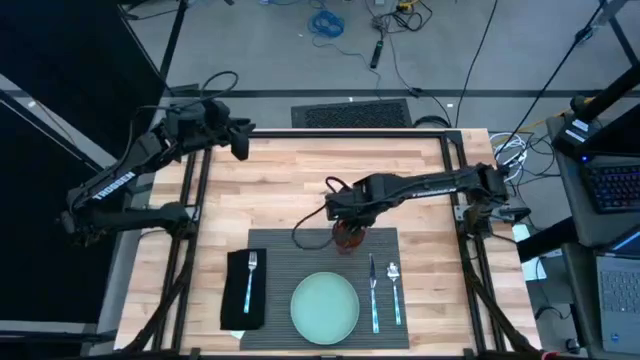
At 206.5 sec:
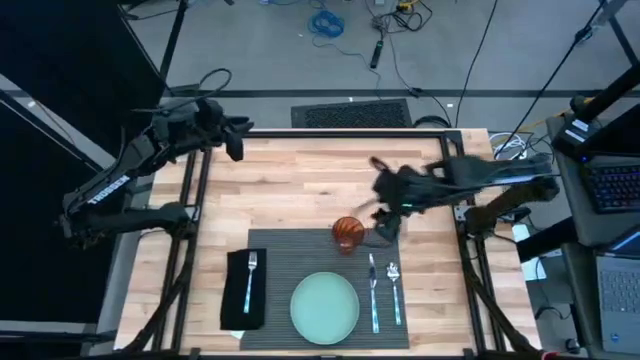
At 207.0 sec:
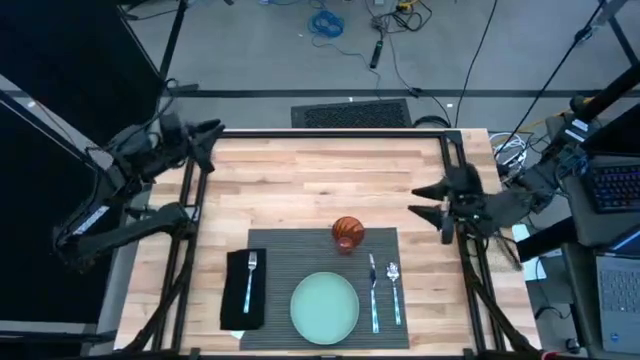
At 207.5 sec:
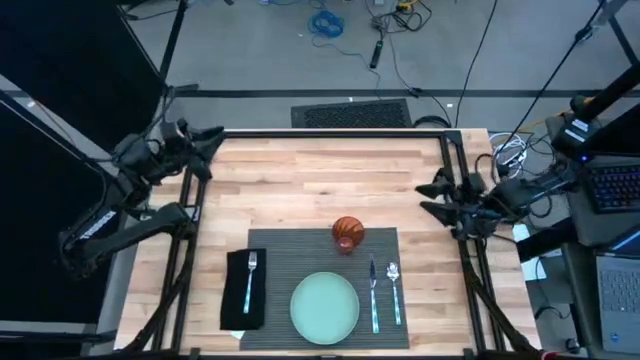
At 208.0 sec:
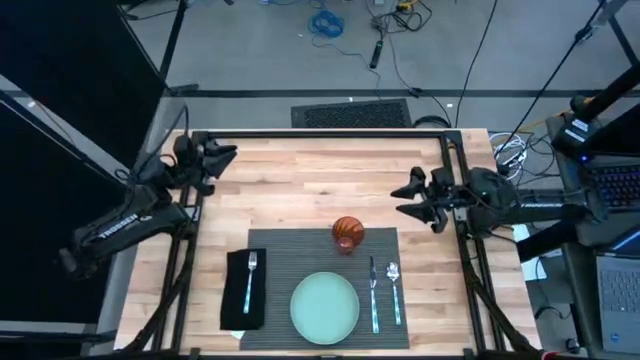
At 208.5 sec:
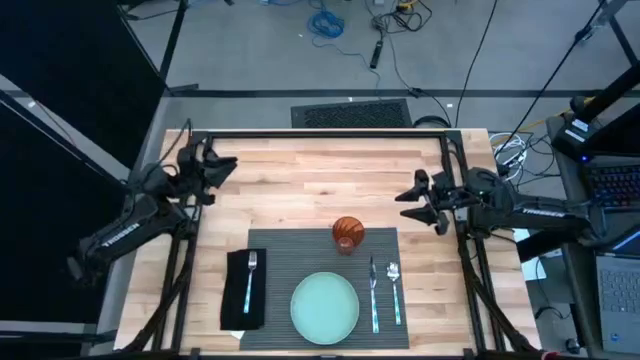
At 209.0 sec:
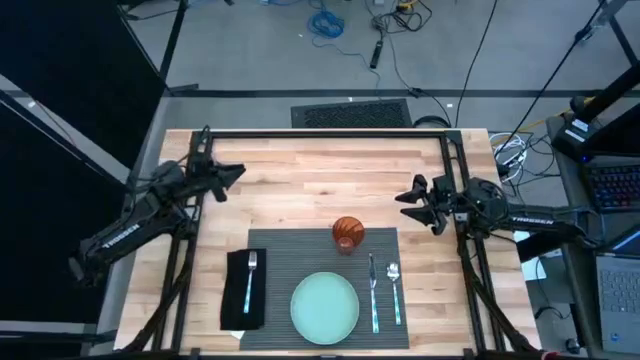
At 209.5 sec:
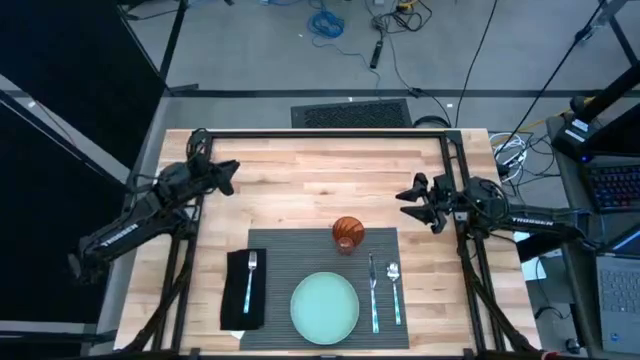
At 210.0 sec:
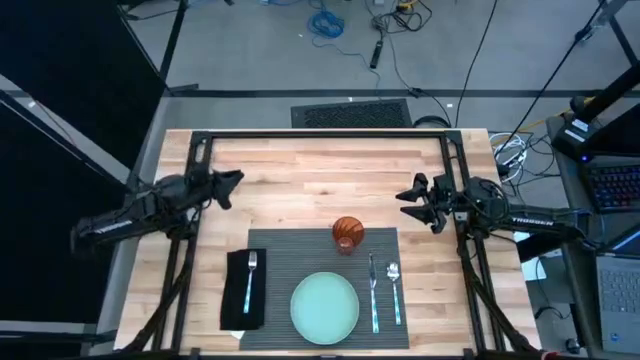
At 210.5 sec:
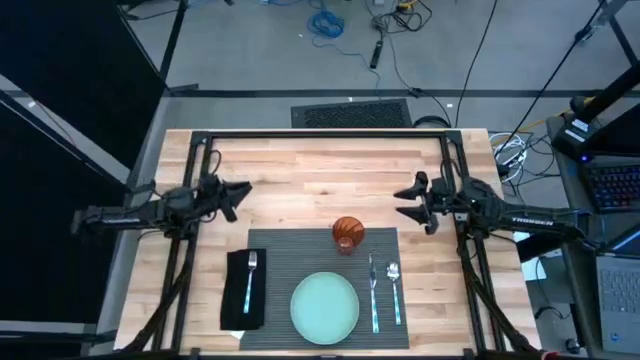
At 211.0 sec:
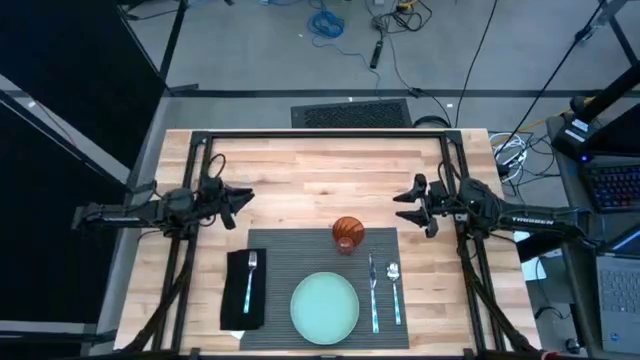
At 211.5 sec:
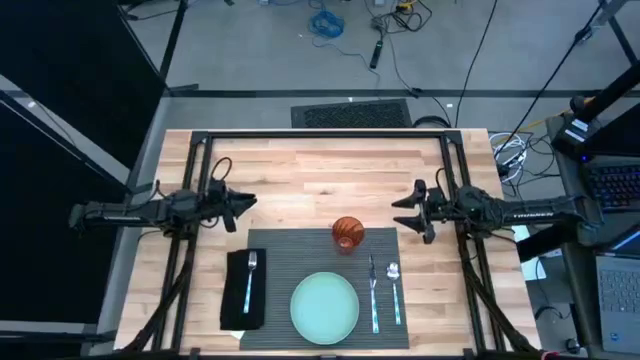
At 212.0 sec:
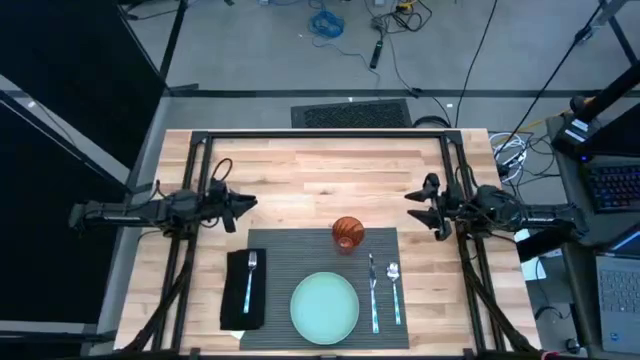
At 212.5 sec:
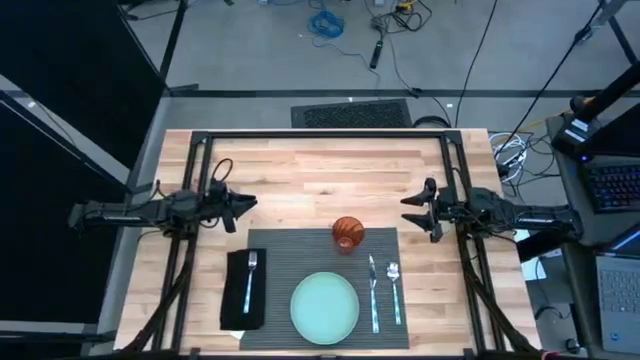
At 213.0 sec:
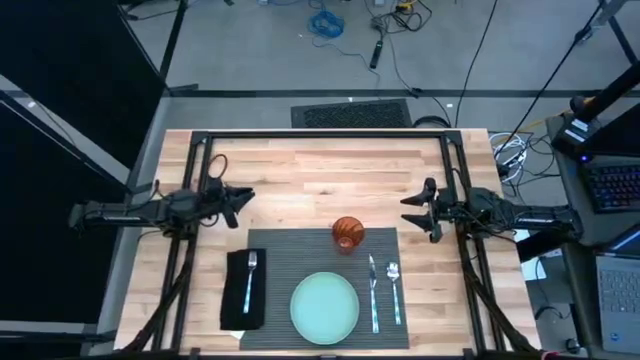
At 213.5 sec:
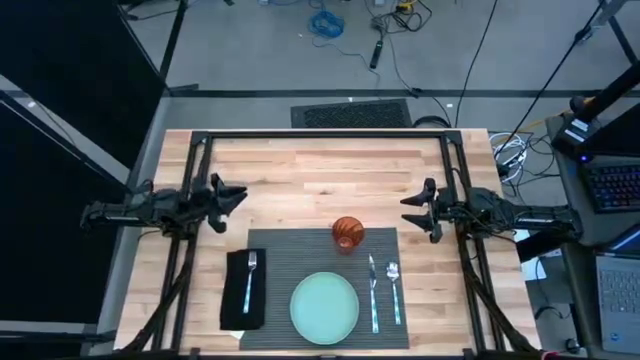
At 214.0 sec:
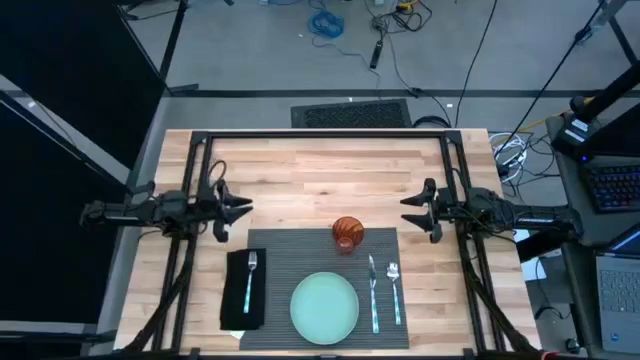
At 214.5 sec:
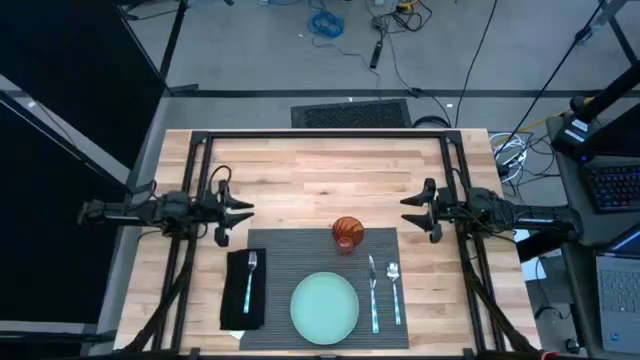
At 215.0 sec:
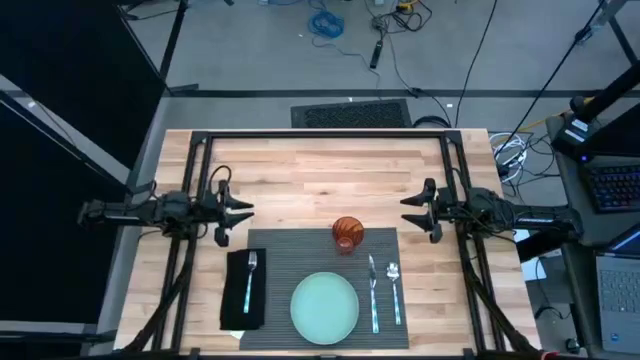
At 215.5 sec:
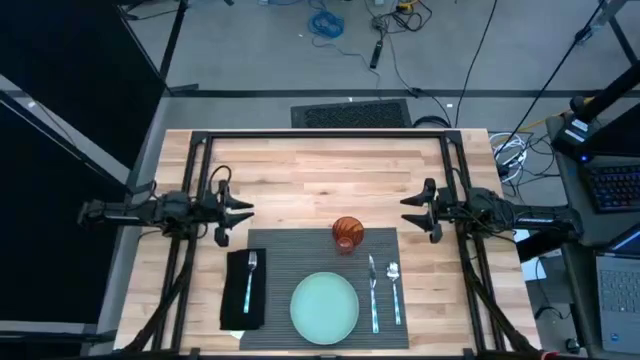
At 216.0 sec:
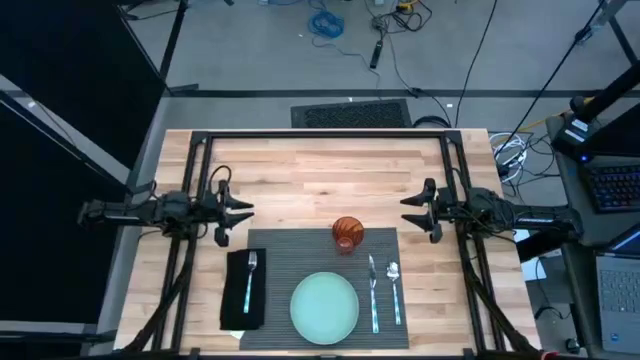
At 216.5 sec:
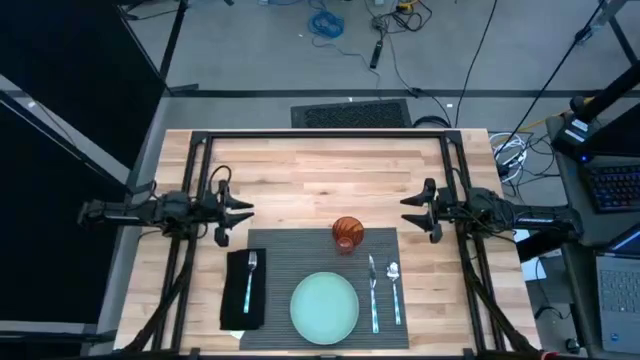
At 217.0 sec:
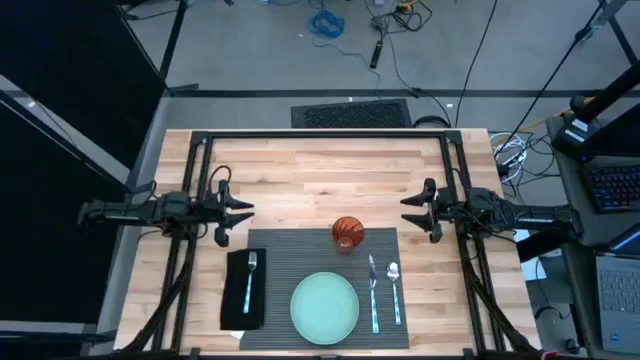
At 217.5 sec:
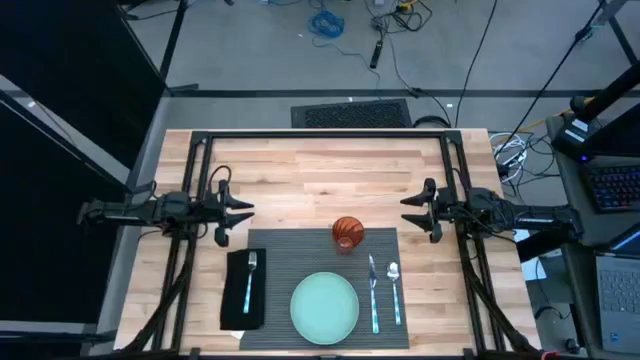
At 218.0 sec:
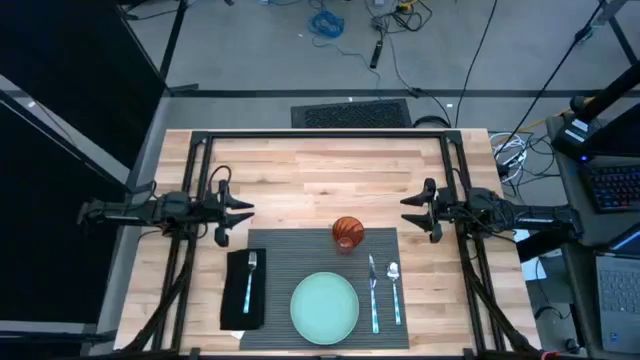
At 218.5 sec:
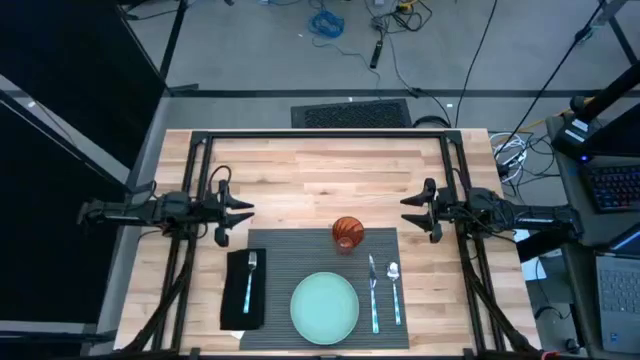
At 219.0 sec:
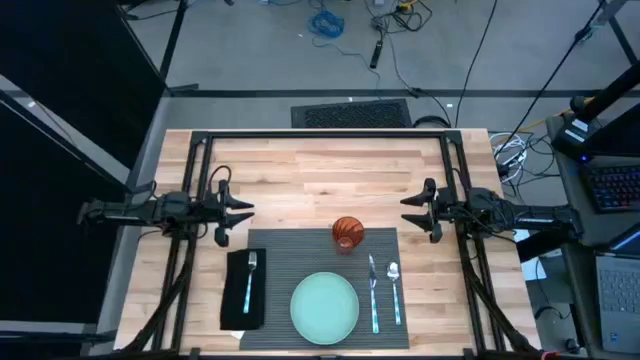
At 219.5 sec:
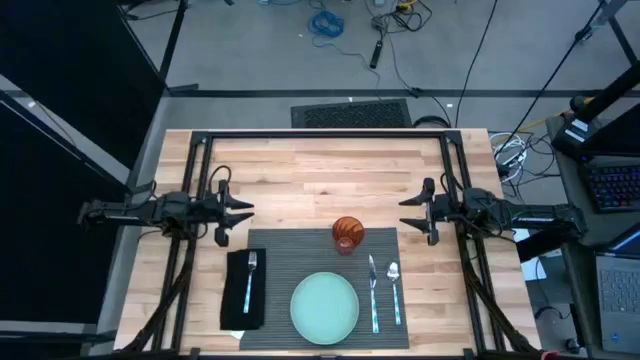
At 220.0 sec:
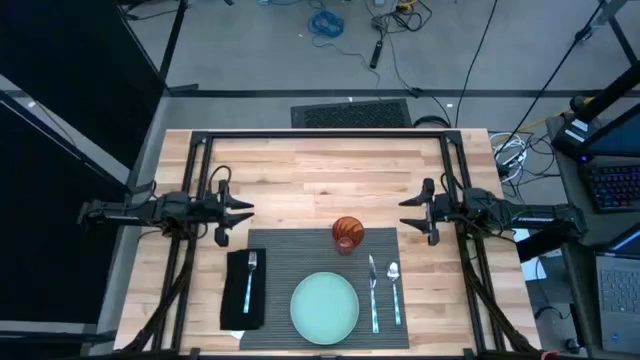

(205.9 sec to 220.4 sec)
Task: Set table place
Return to Home Position

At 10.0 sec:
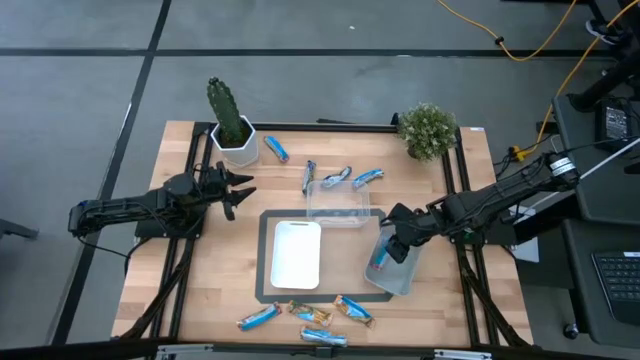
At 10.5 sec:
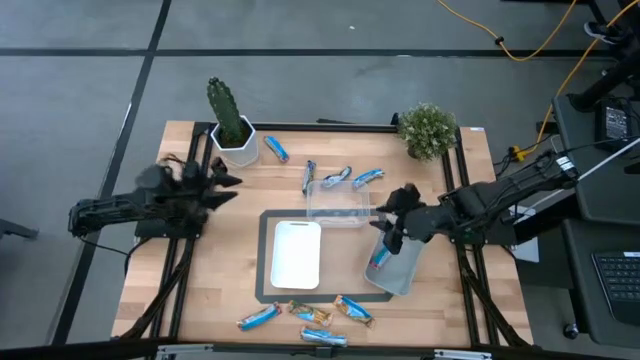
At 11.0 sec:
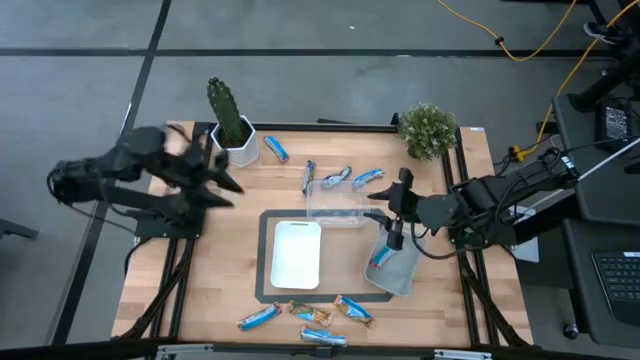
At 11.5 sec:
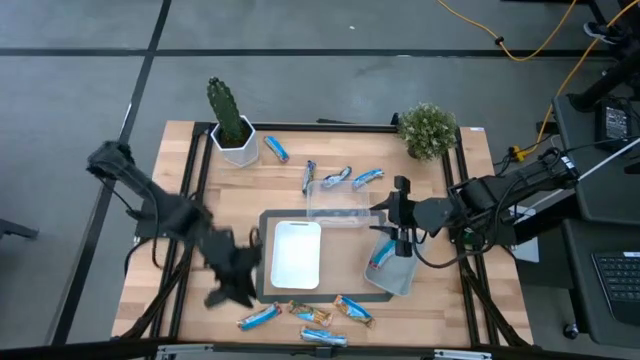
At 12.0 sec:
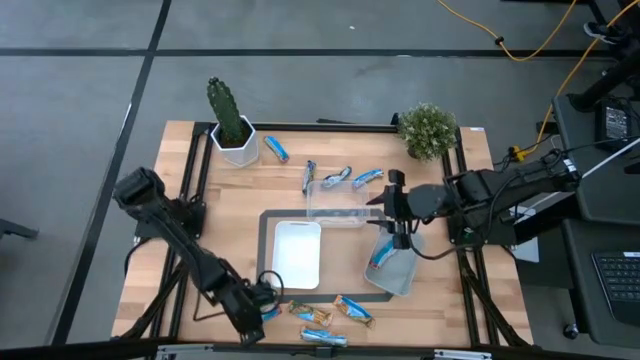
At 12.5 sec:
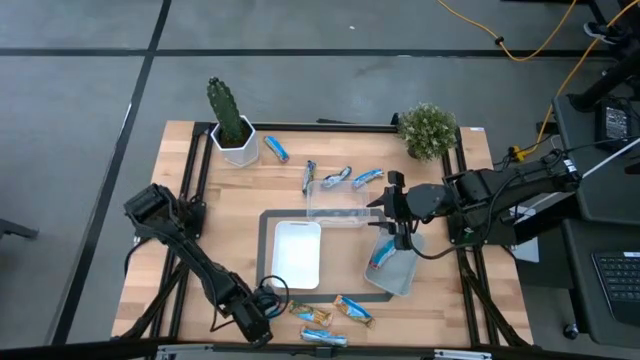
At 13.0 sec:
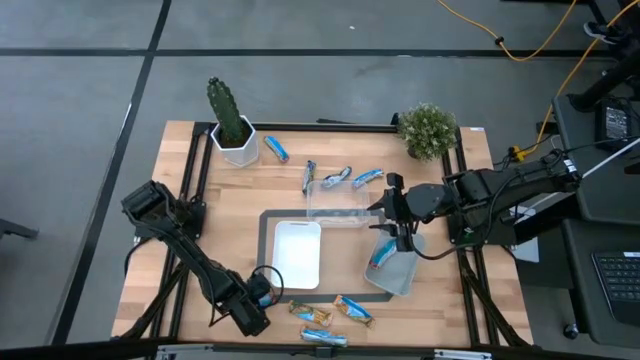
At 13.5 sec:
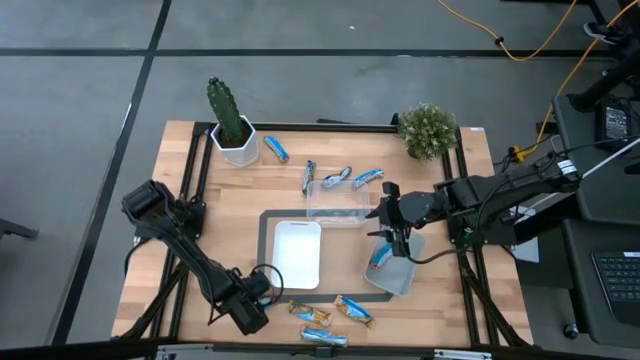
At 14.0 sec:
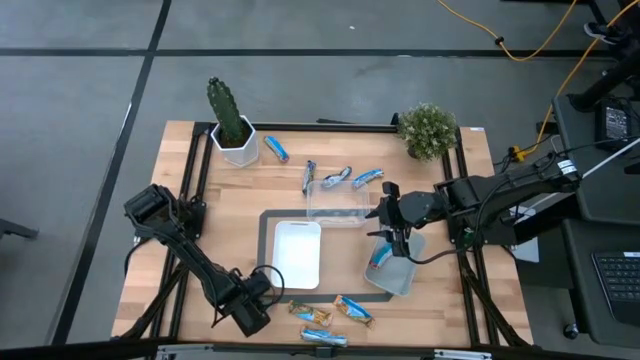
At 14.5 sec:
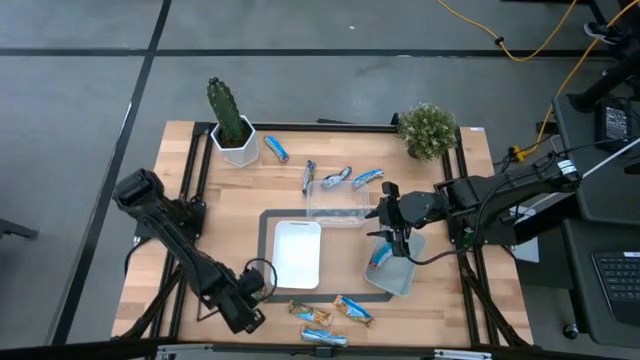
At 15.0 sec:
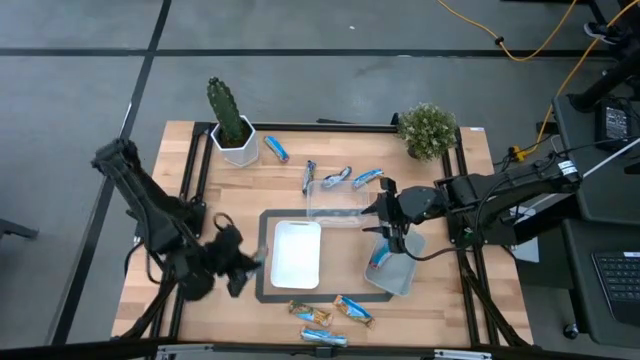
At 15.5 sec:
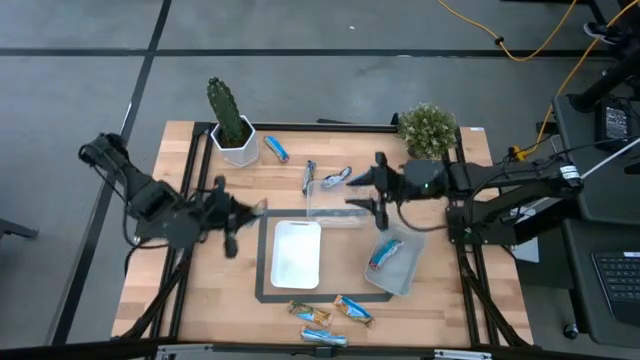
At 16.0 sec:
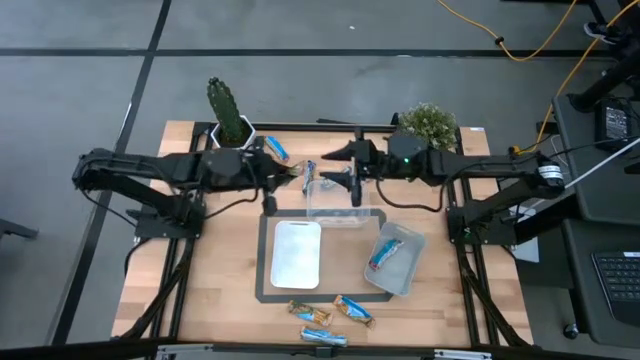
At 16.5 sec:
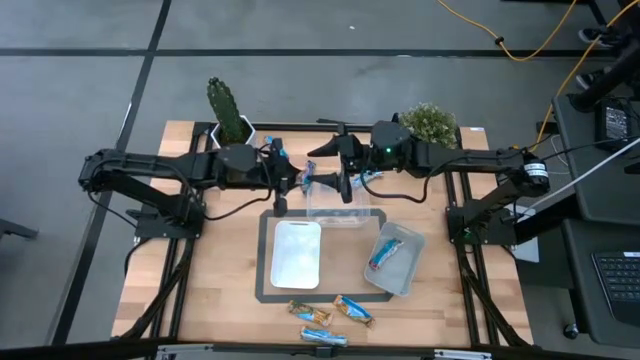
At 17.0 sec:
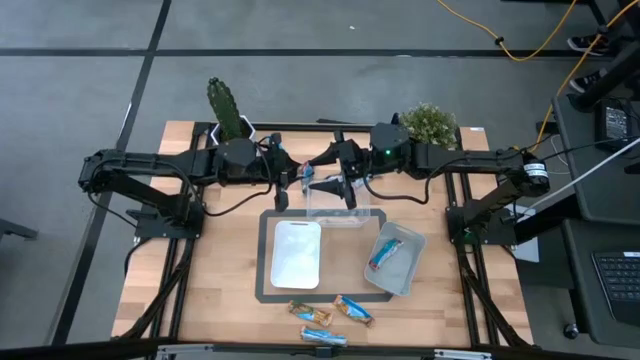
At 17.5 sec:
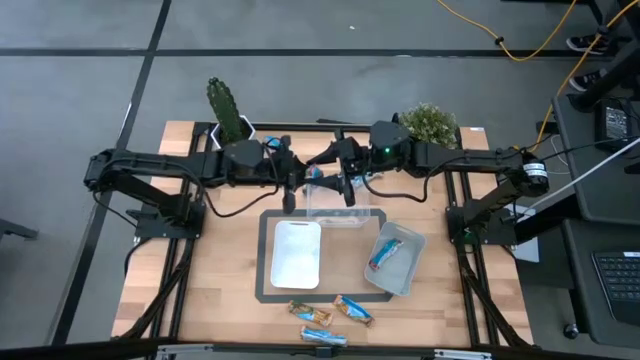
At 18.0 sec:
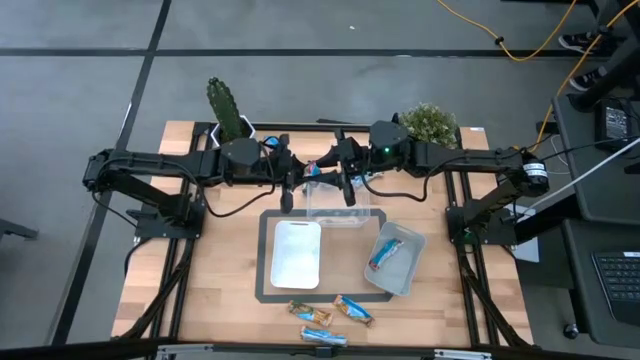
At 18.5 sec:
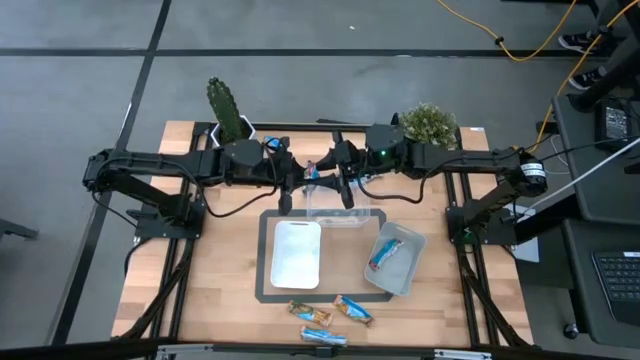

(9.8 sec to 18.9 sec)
Task: Pick and place Granola Bars by type
Put the red granola bar into the gray bin
